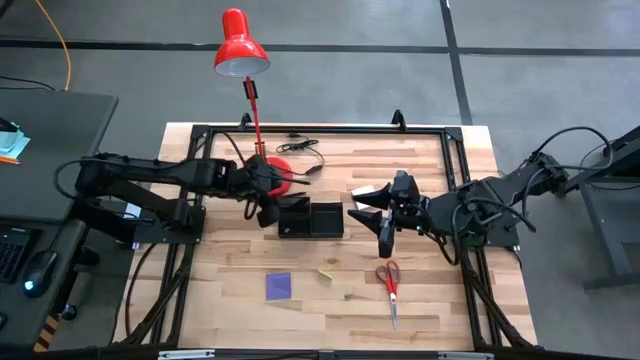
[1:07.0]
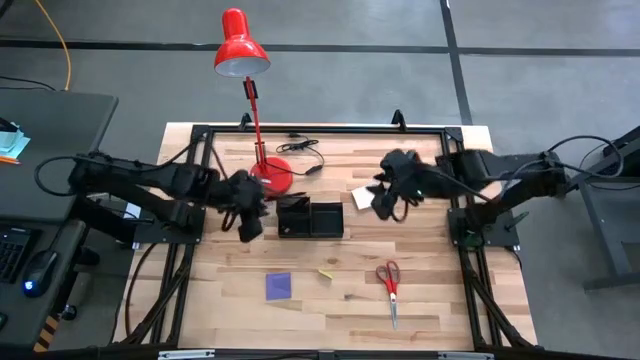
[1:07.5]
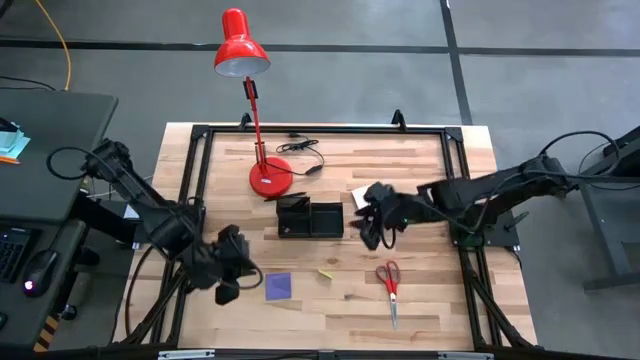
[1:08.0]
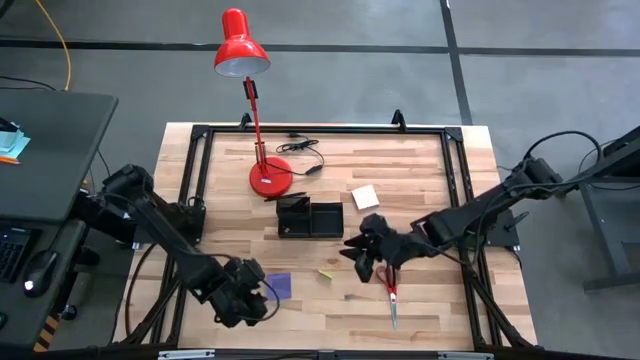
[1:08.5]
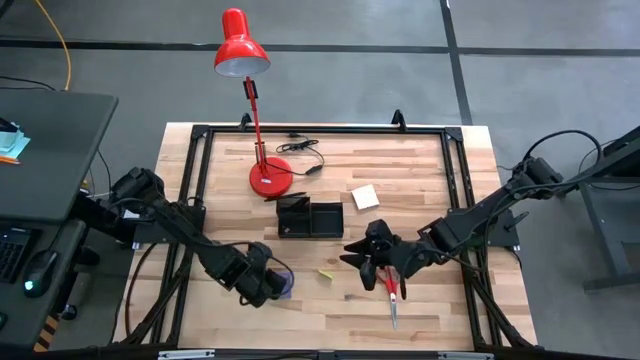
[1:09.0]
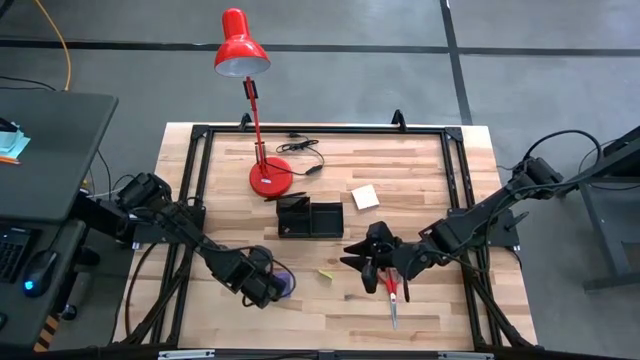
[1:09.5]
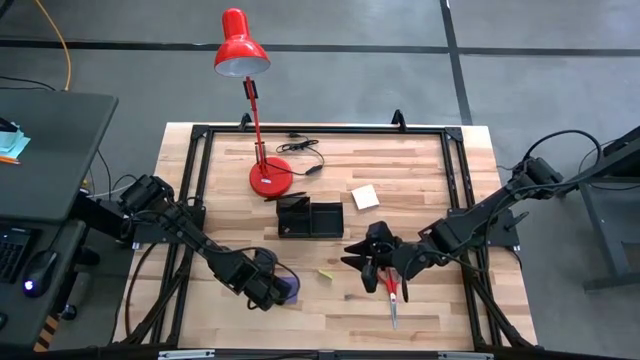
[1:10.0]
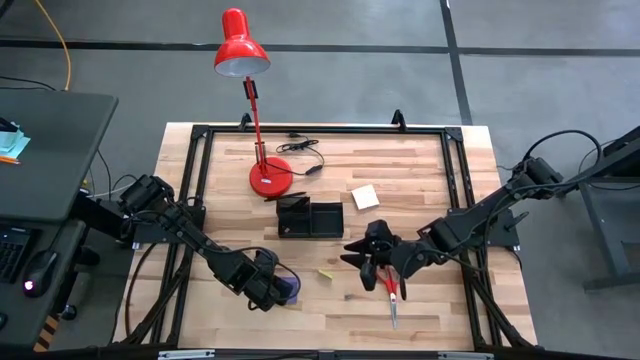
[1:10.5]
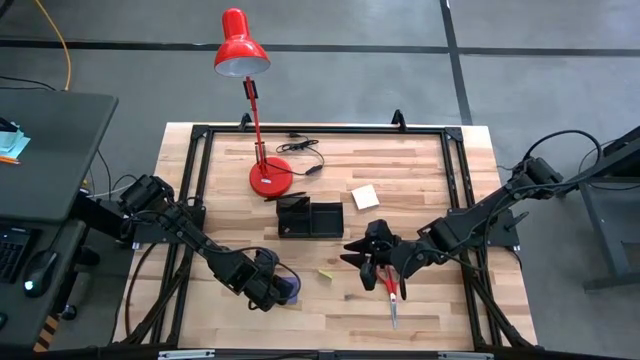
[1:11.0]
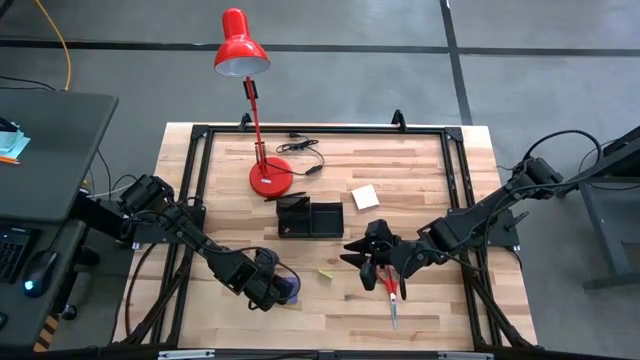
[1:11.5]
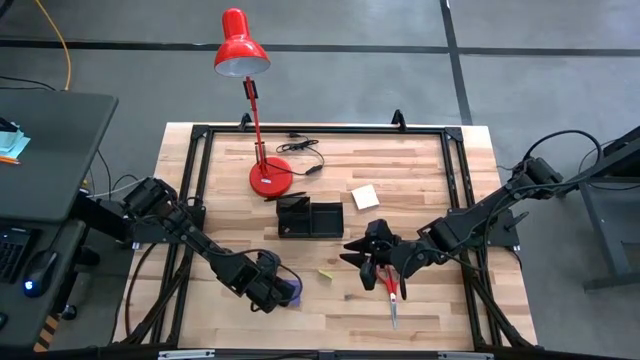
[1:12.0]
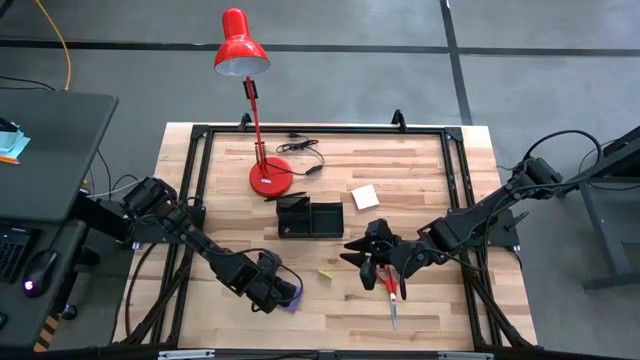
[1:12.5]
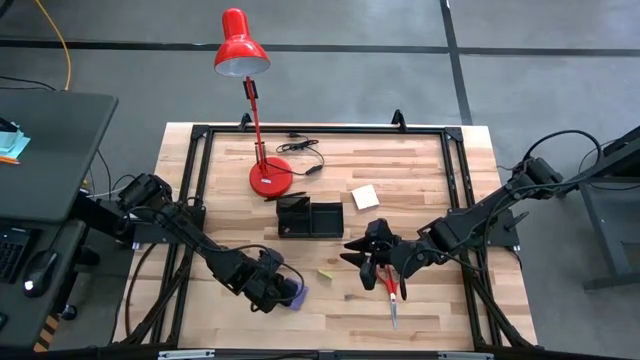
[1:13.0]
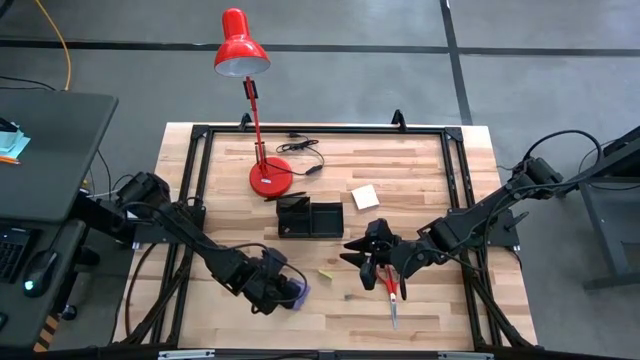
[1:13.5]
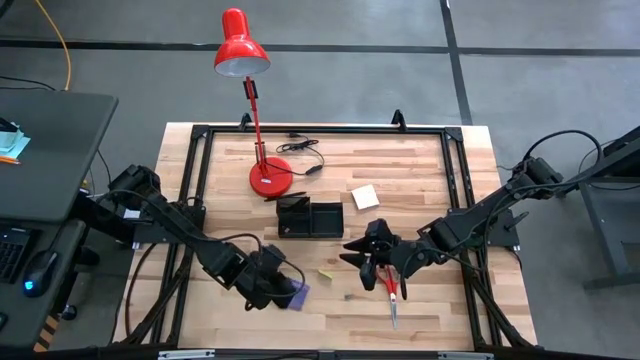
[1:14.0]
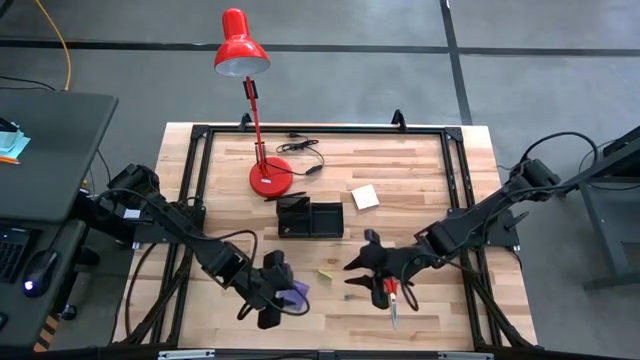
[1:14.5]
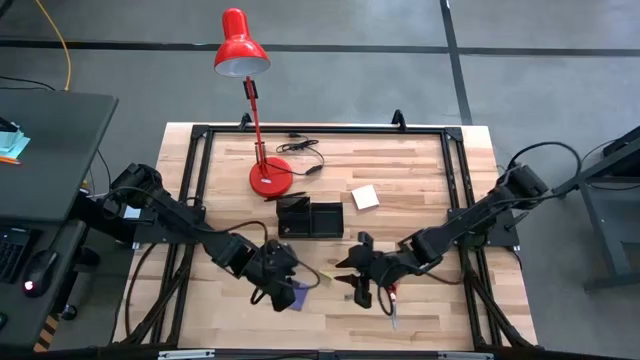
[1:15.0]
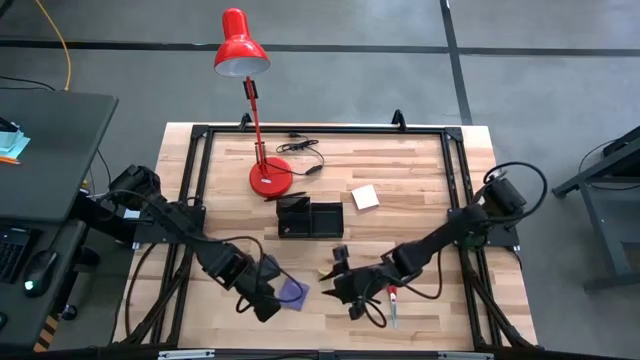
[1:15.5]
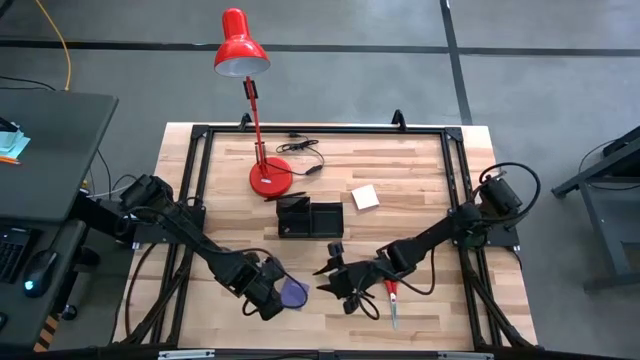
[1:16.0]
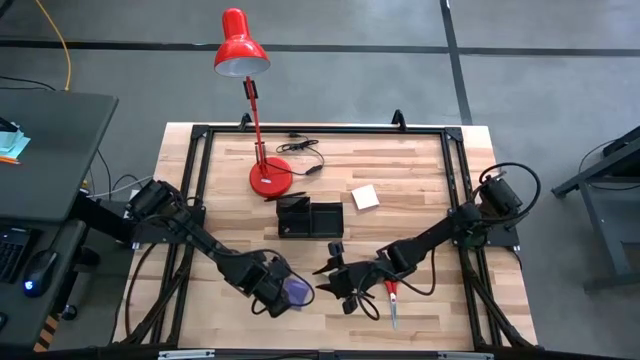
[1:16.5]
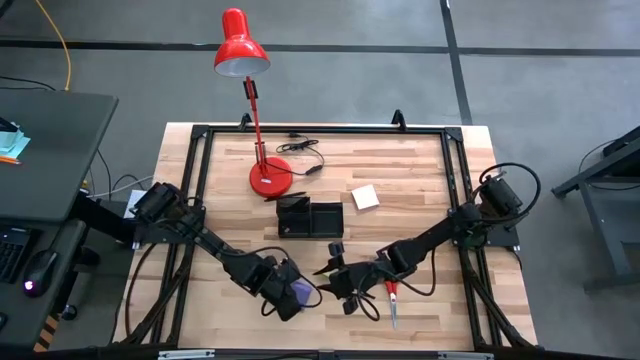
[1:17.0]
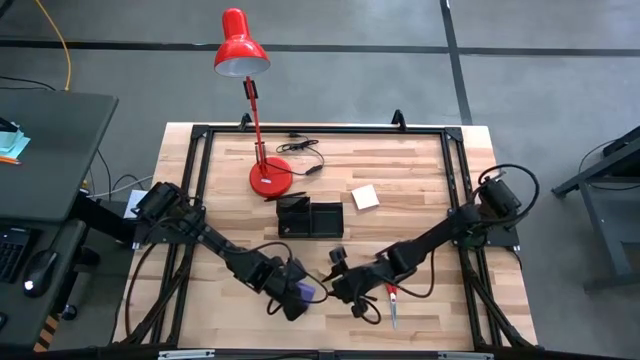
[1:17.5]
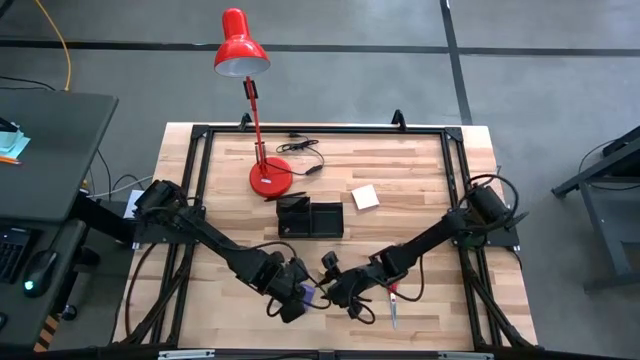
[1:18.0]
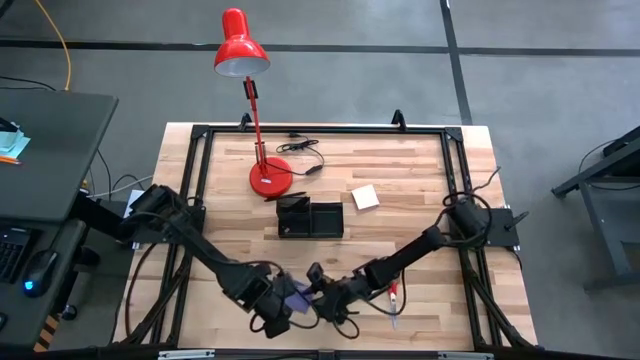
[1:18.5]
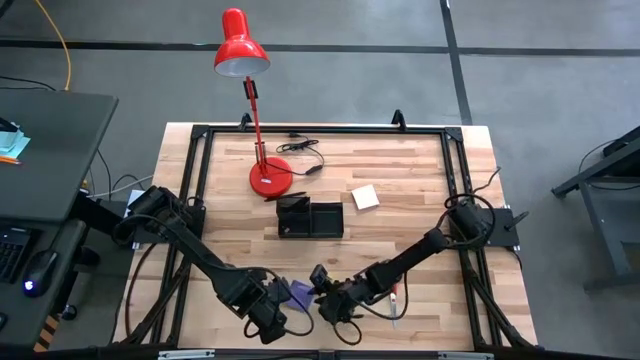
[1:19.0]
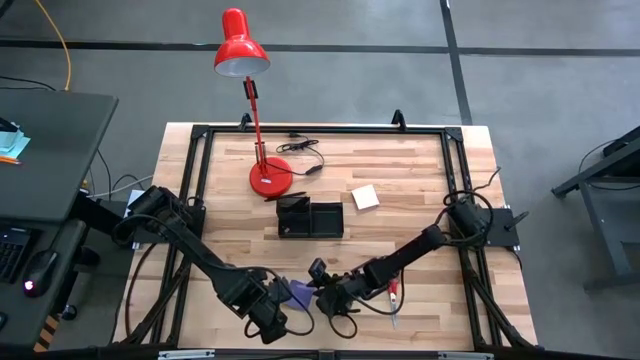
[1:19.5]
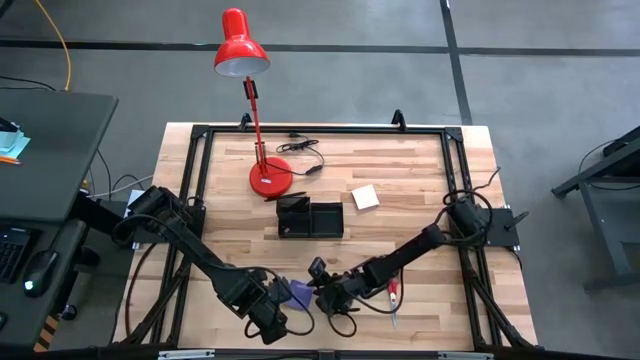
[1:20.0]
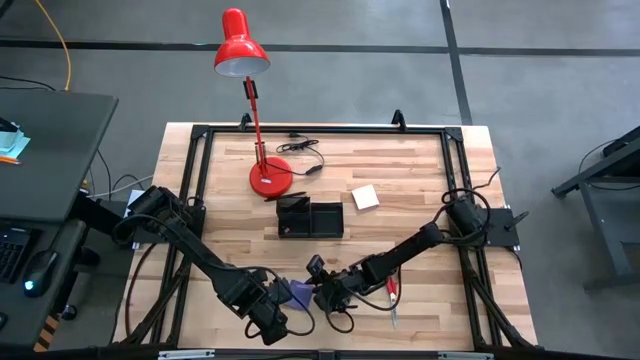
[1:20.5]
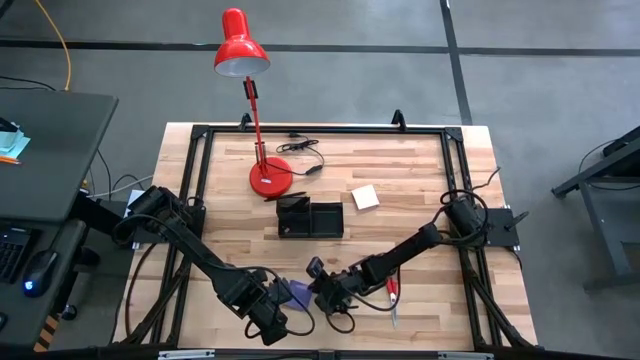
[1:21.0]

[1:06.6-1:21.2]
Task: Pick and place office supplies into organizer
Put the purple sticky note into the desk organizer

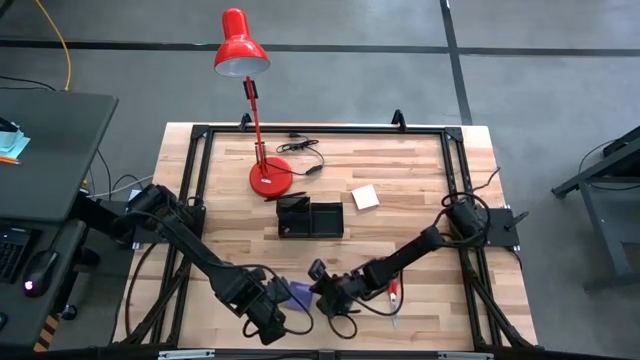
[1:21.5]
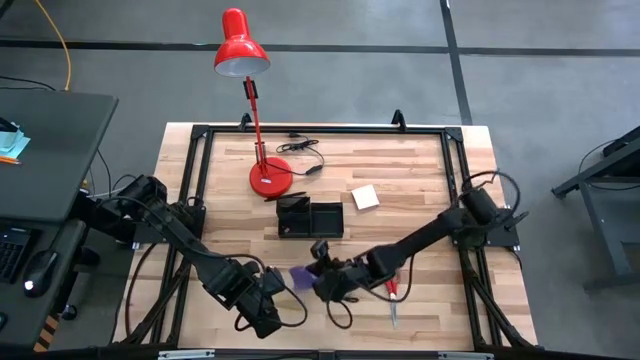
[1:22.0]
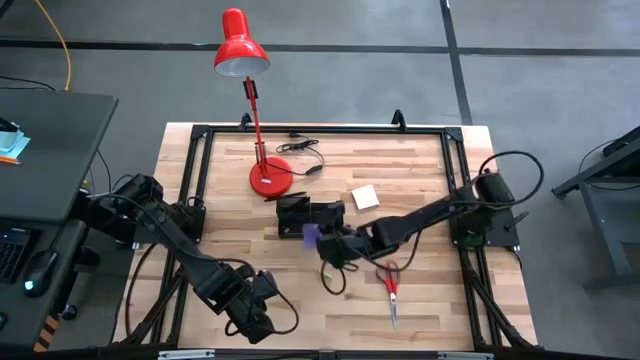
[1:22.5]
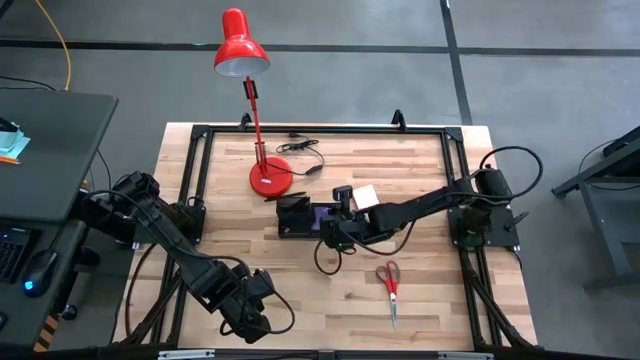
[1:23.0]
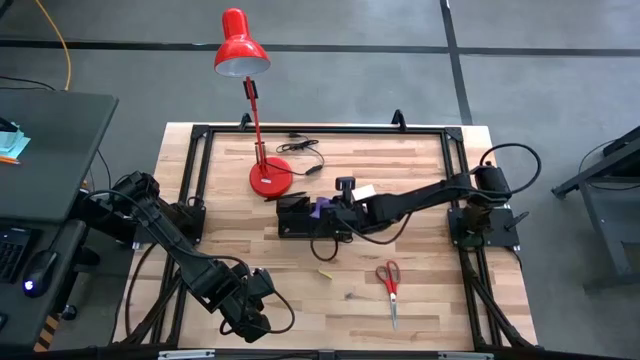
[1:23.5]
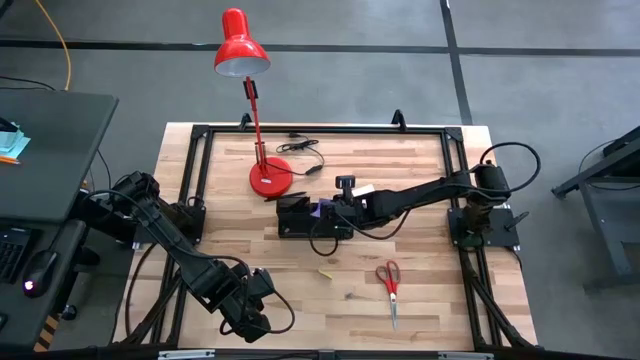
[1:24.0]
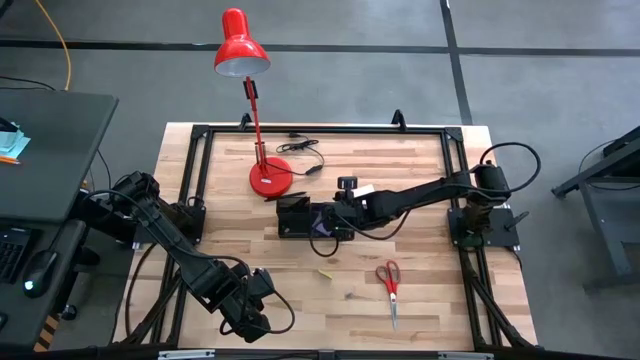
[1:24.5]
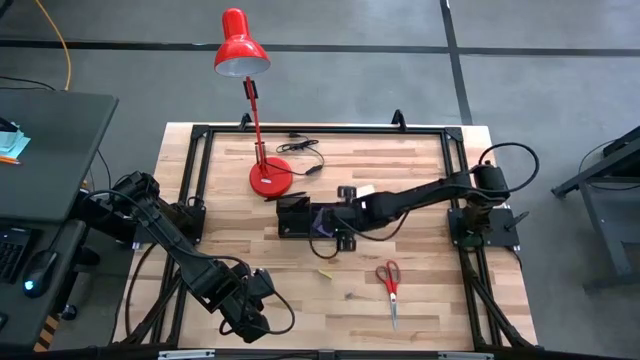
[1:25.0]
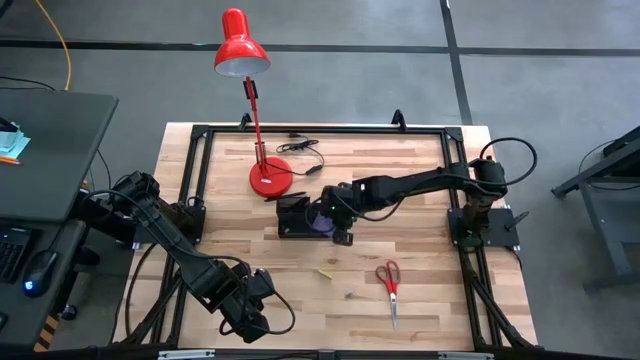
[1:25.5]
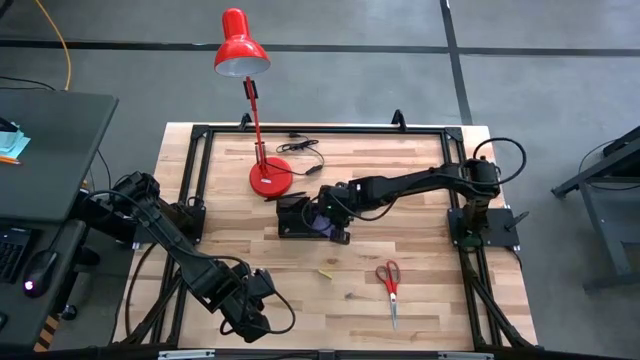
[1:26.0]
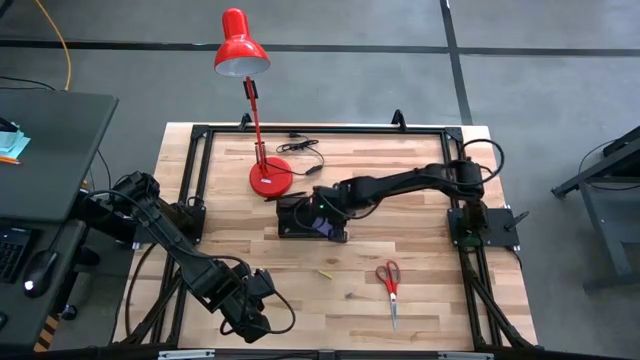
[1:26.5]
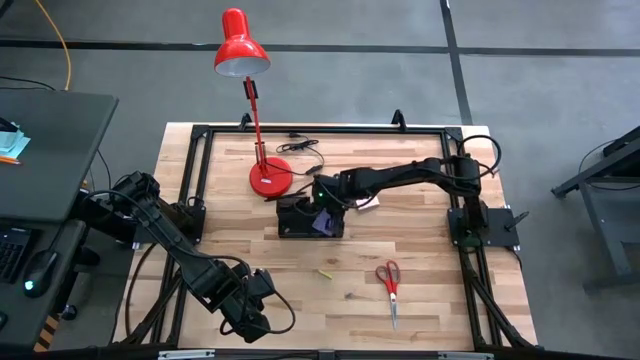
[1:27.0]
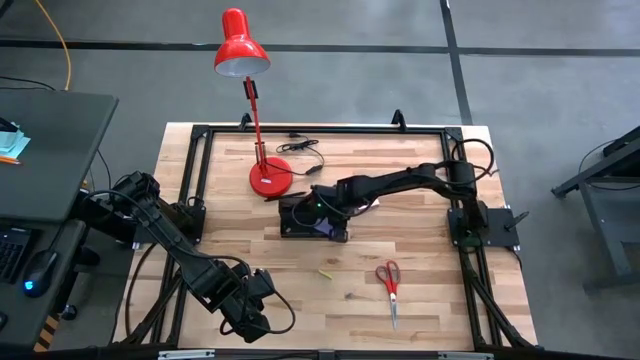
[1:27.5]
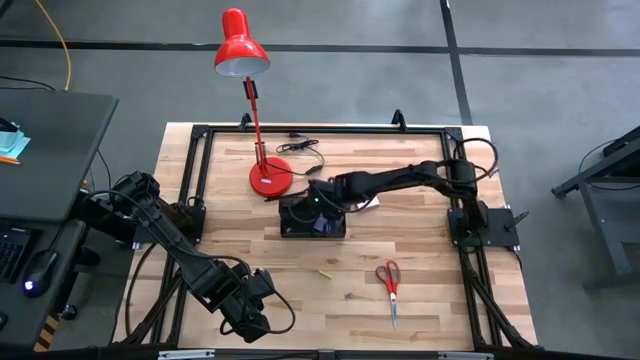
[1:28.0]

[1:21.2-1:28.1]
Put the purple sticky note into the desk organizer
